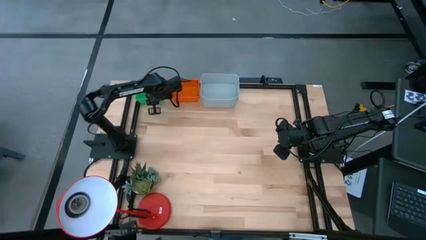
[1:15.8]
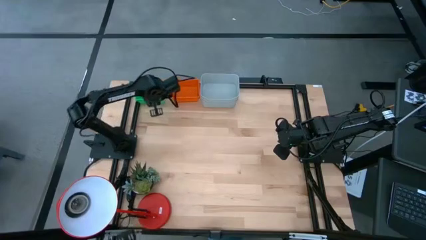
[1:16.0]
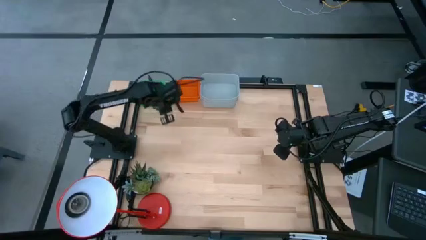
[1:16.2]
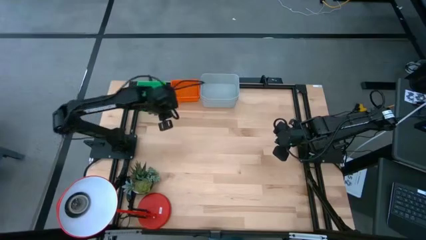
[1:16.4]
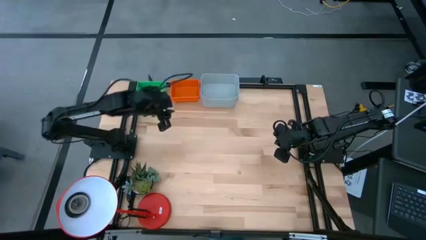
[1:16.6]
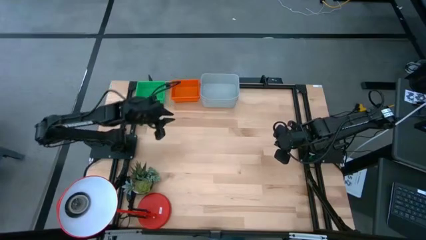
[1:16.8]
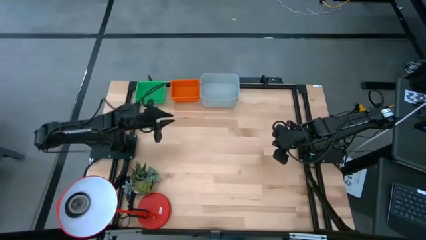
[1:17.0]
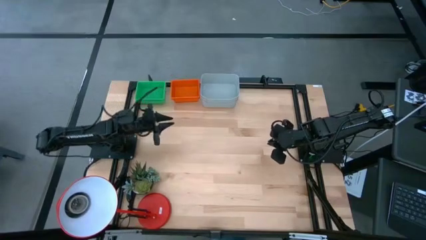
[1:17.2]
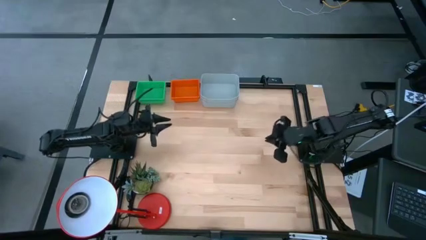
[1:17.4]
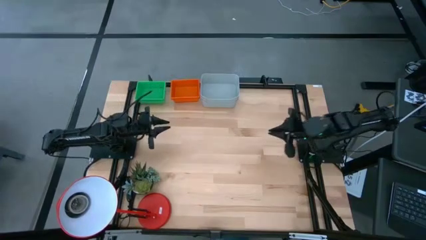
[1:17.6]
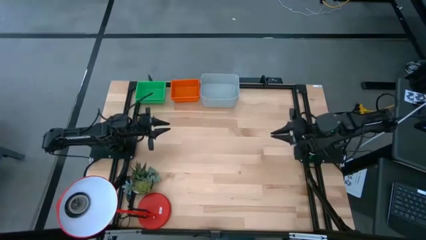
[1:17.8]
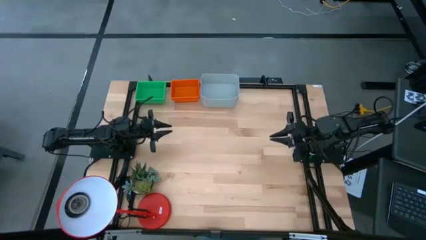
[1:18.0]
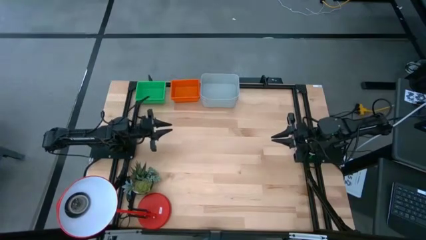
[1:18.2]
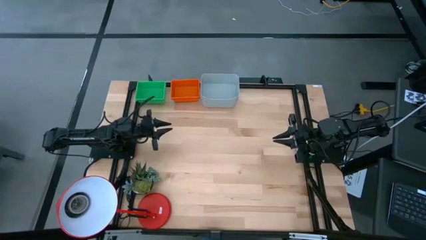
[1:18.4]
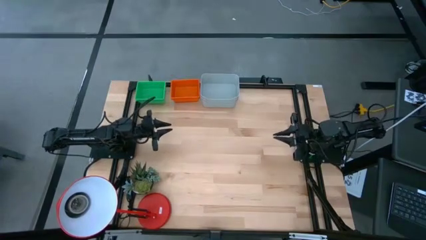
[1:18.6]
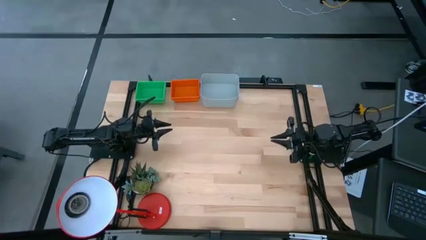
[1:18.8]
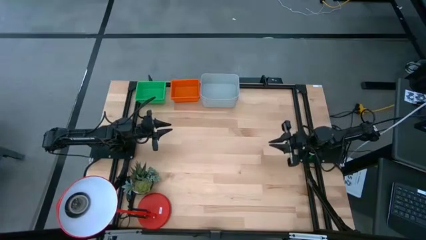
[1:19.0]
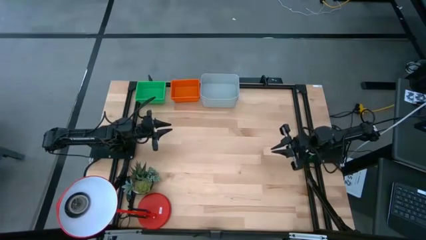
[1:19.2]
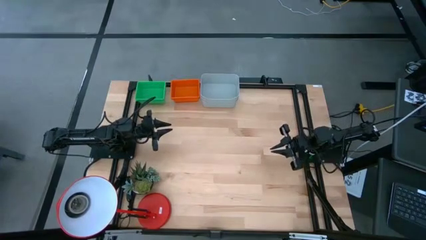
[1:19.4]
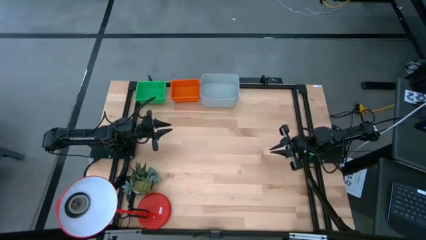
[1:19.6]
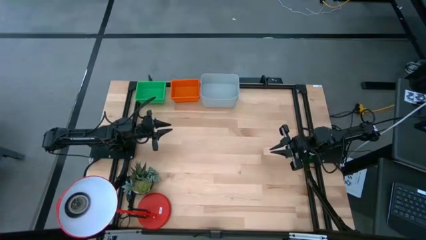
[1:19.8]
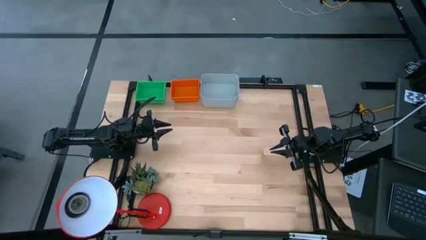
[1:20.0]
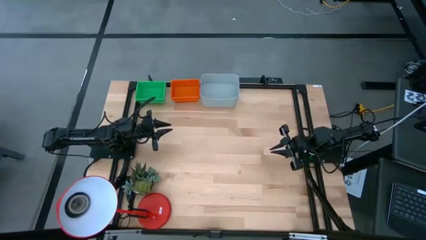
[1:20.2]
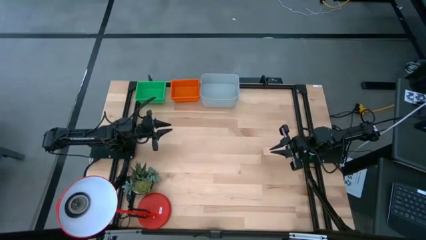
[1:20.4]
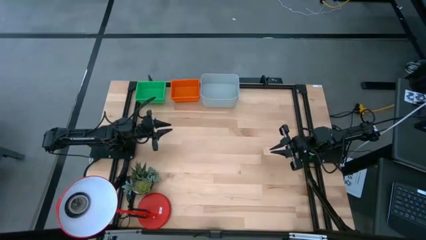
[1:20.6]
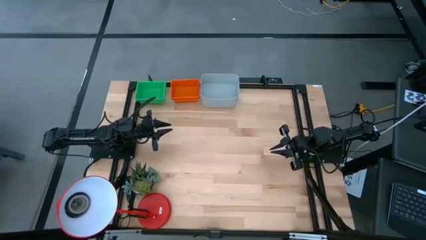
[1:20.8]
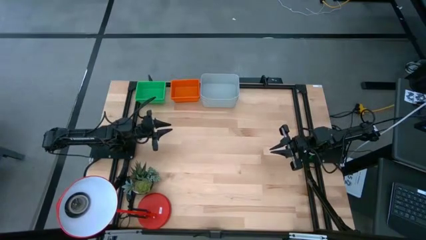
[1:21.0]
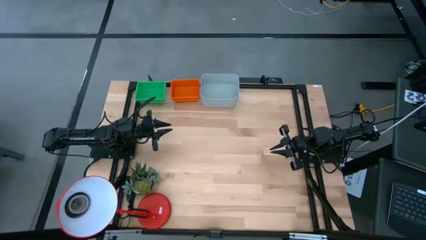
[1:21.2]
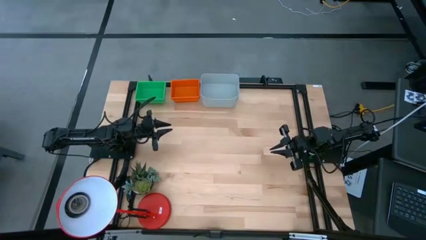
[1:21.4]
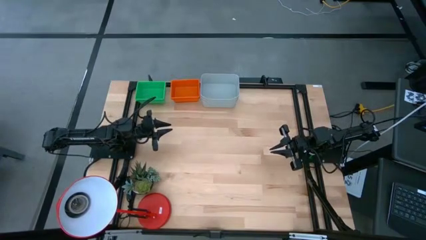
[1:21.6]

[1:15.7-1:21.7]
Return to Home Position

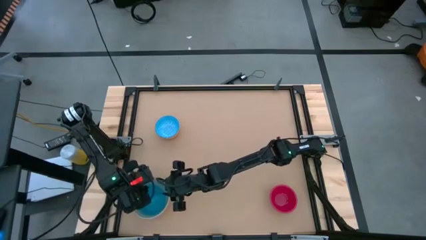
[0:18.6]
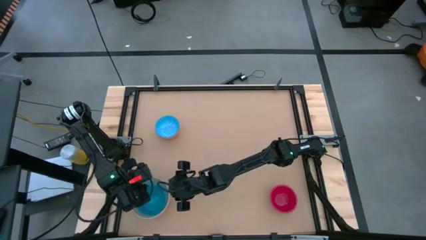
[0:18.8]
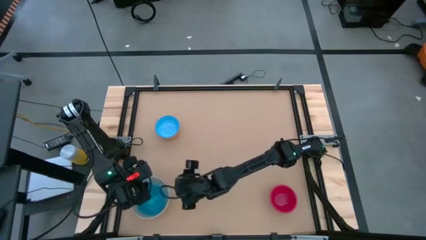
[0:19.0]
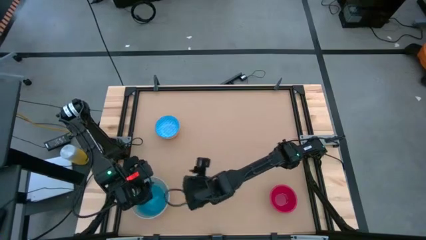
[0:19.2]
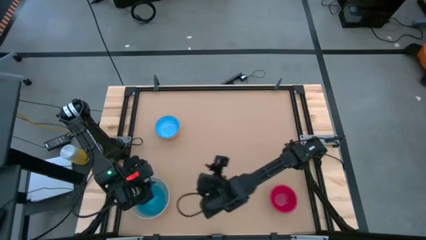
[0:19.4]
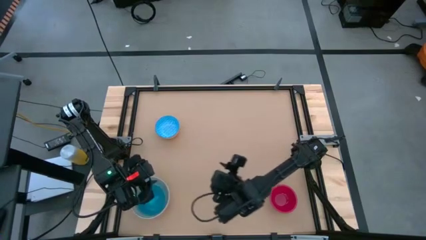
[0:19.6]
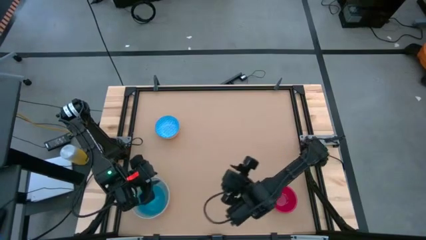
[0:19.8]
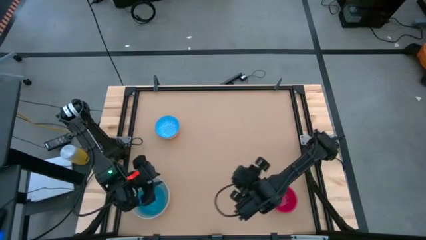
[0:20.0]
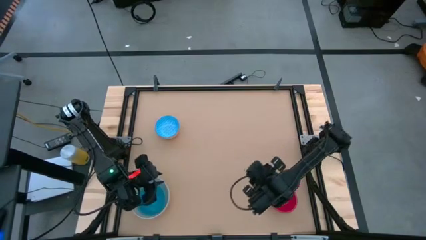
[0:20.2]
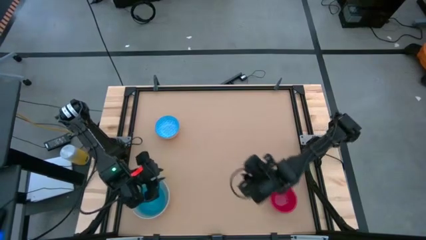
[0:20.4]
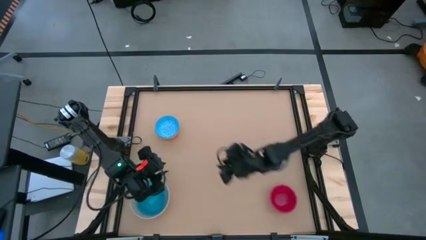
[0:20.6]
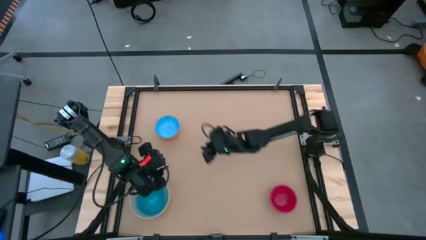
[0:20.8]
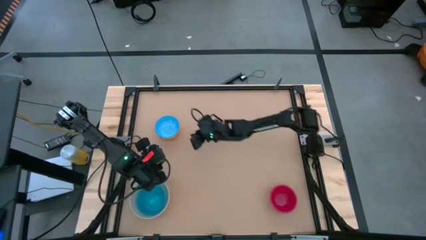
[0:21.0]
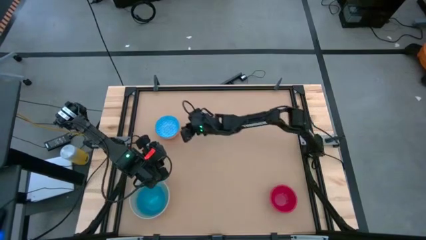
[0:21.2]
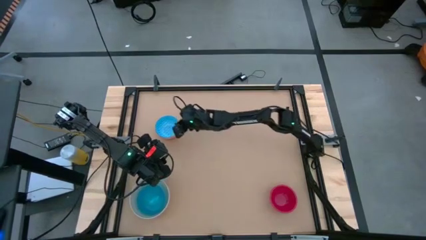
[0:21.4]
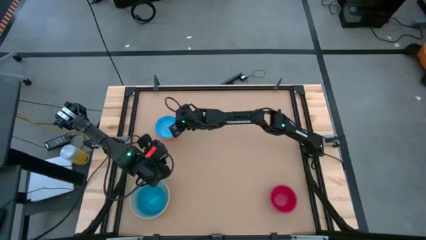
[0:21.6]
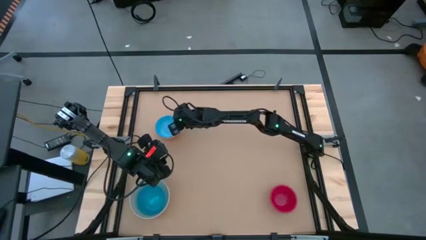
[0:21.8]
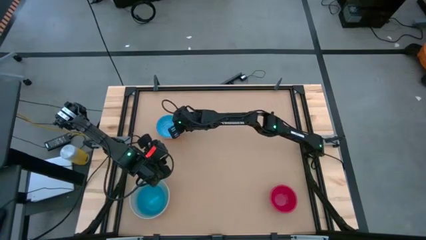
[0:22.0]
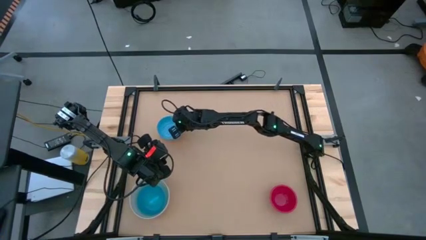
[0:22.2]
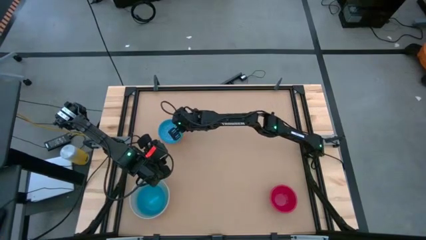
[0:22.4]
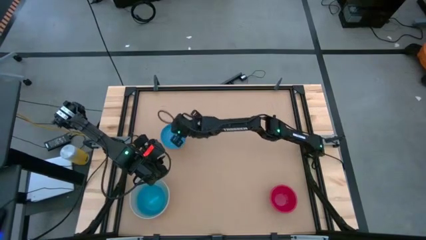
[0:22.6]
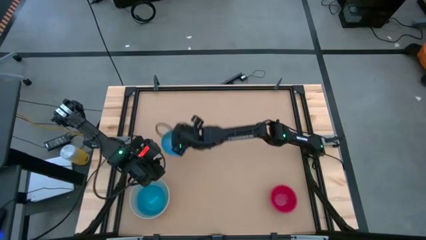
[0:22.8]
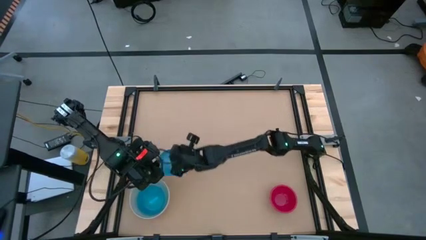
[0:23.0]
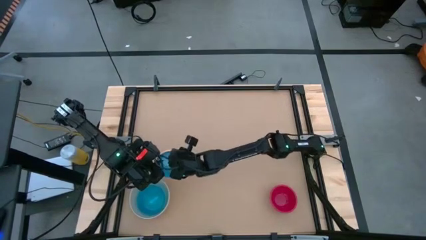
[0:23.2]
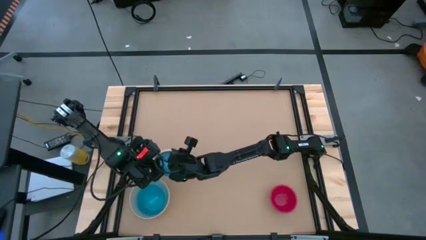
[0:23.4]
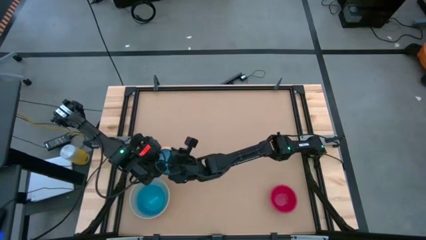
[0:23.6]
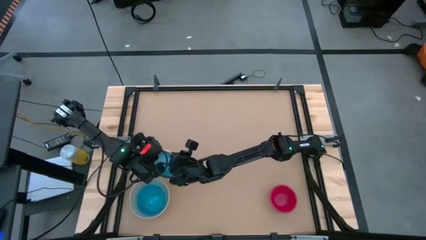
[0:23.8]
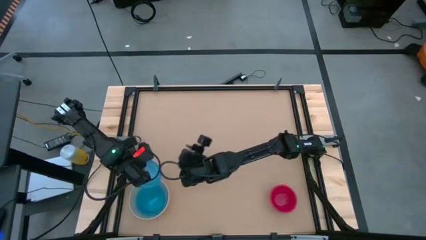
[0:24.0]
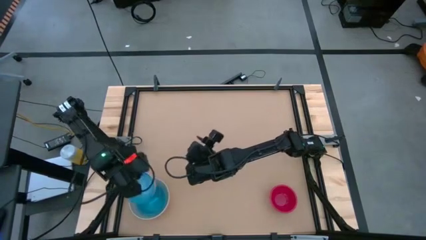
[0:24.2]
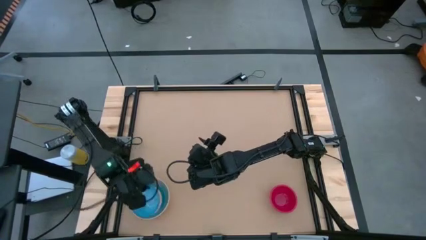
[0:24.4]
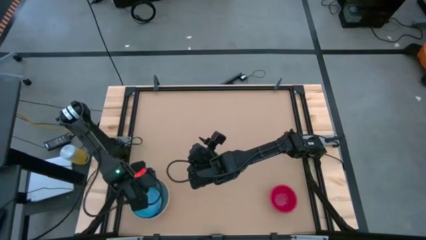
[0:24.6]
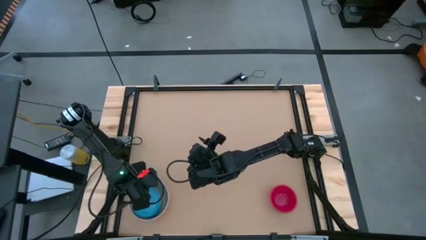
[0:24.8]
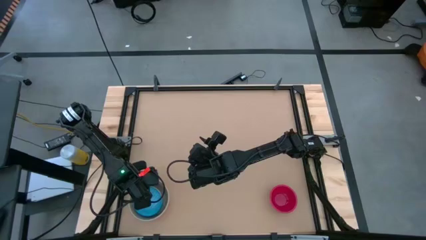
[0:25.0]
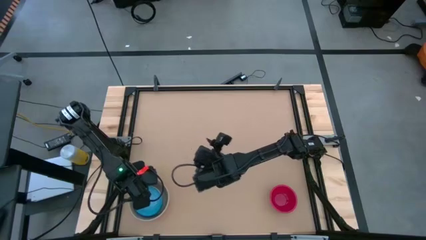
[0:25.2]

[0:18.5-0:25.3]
Stack the light blue bowl on top of the blue bowl

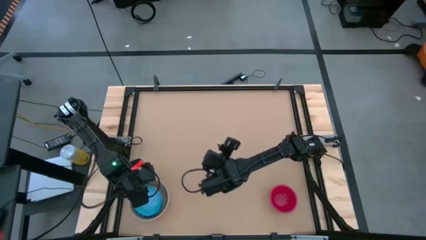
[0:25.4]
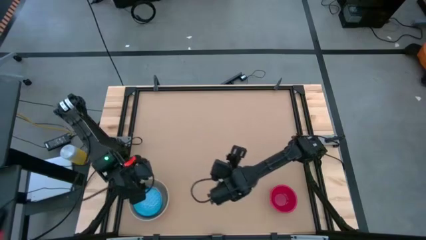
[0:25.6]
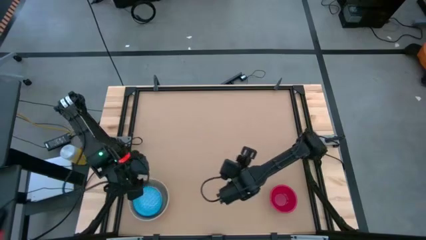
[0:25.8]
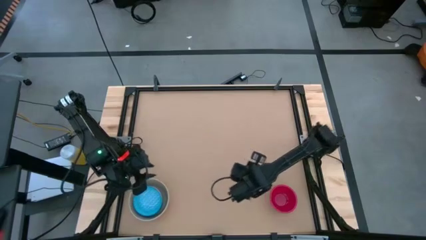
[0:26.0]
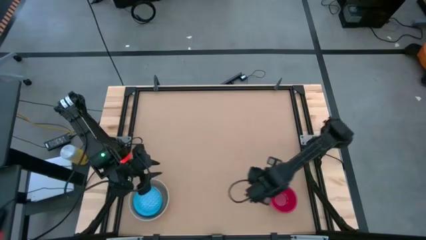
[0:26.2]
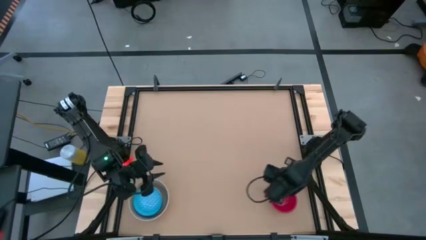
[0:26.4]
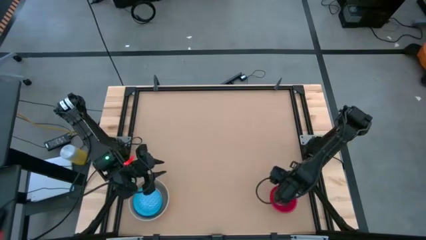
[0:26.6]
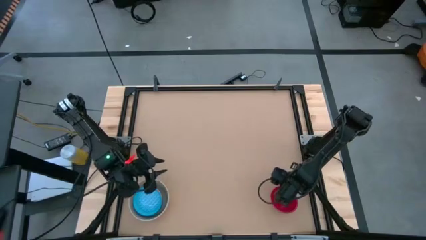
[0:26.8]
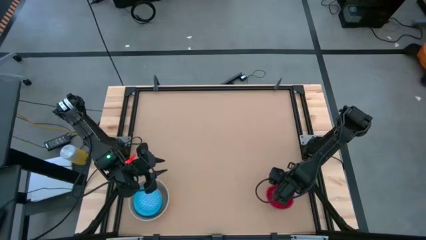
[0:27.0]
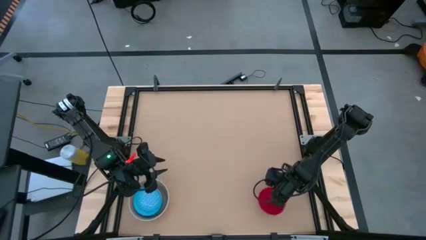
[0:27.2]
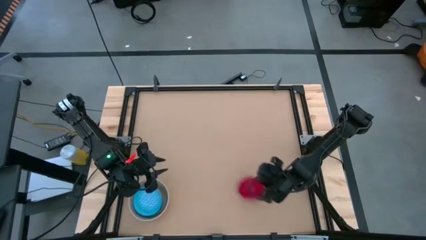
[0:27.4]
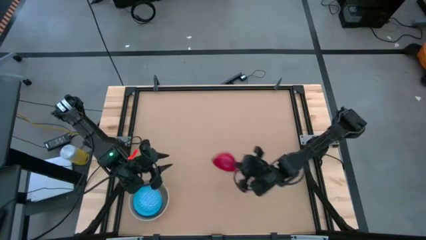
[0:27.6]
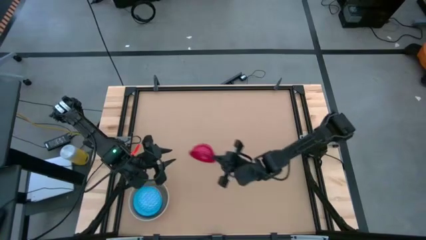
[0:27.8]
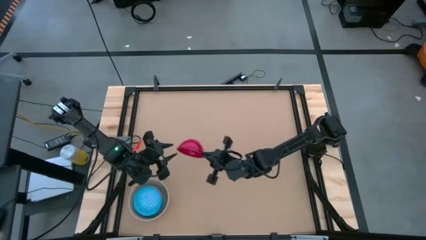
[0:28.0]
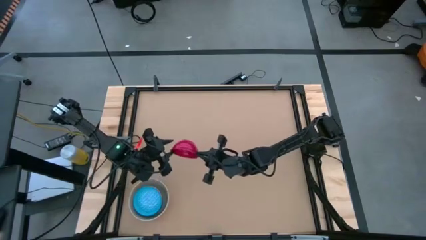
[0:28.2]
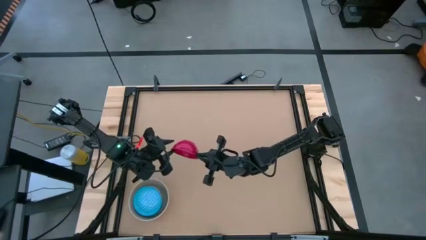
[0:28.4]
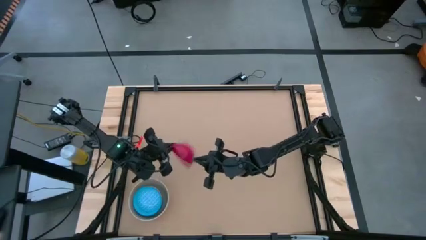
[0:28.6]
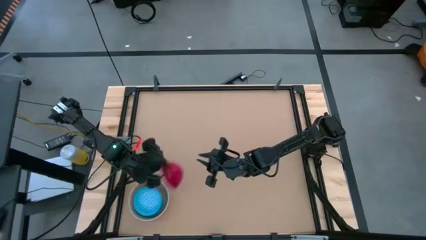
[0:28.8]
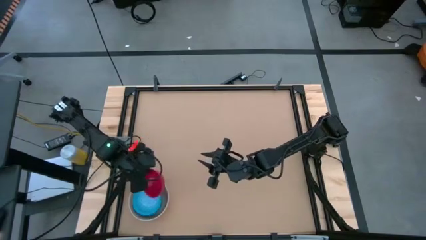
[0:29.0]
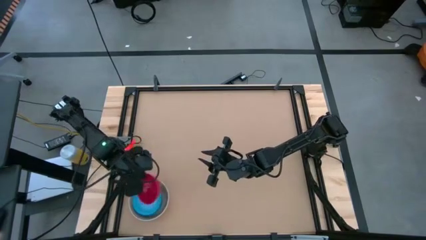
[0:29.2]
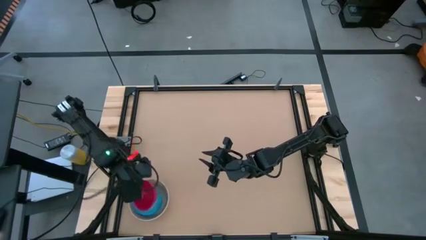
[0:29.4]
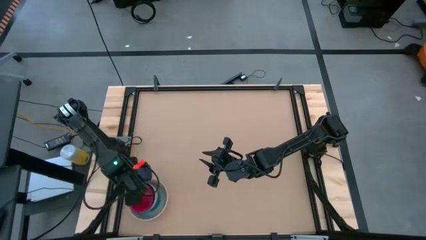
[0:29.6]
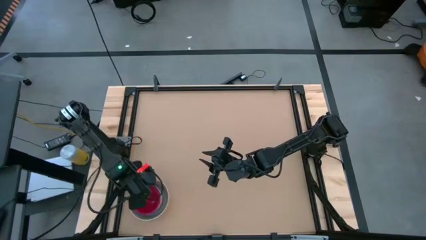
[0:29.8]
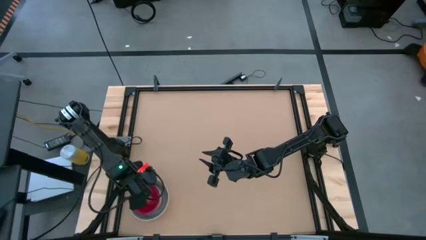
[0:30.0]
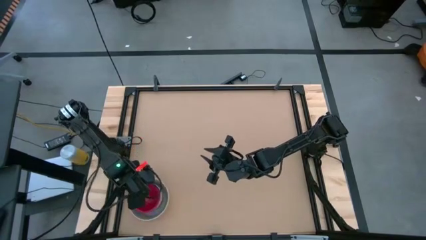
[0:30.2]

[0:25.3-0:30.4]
Stack the red bowl on top of the light blue bowl
